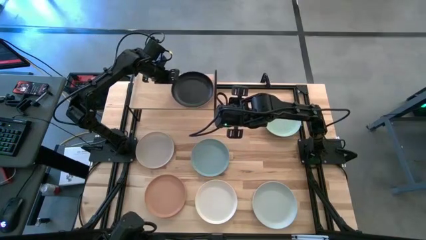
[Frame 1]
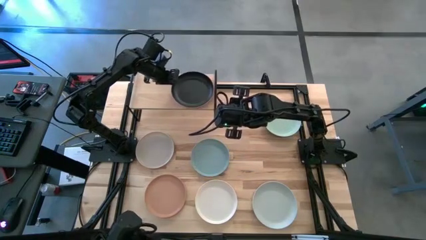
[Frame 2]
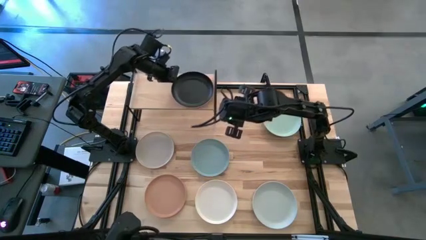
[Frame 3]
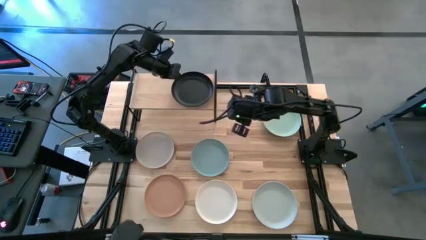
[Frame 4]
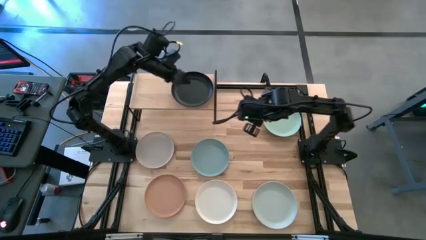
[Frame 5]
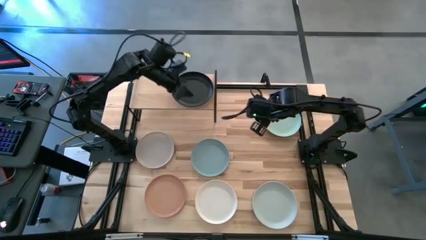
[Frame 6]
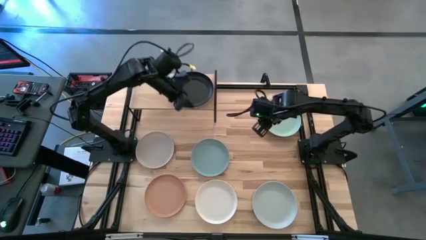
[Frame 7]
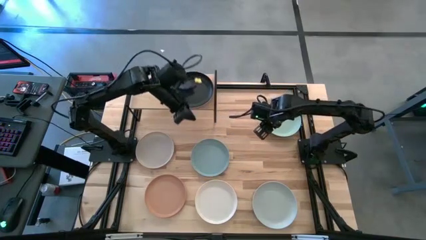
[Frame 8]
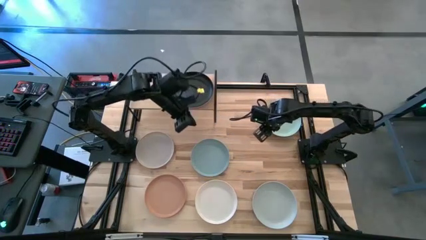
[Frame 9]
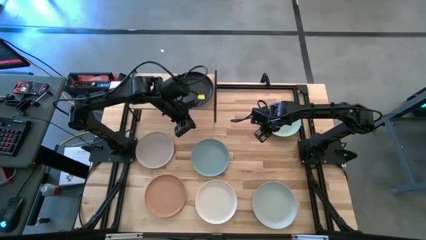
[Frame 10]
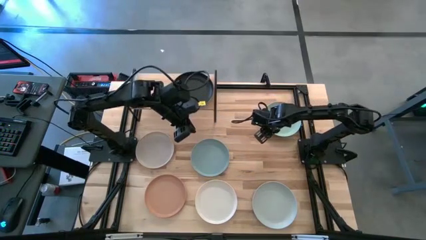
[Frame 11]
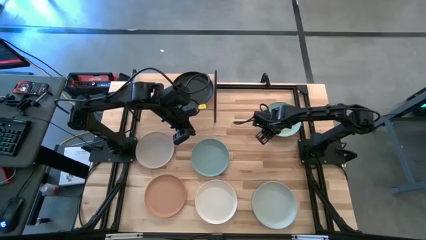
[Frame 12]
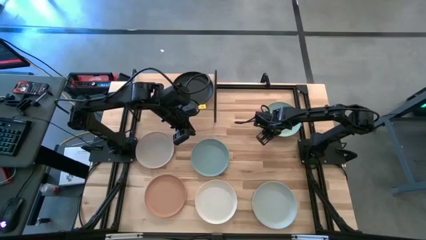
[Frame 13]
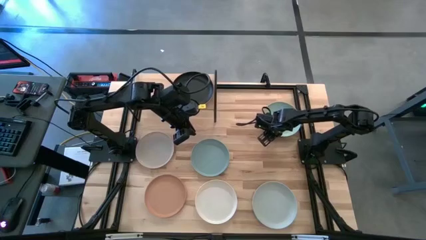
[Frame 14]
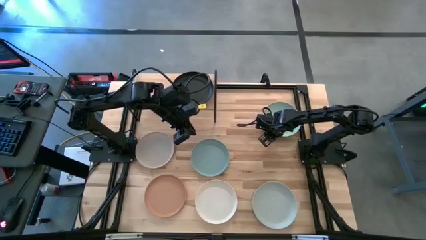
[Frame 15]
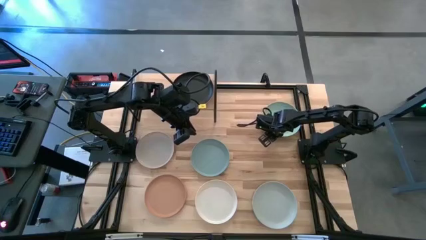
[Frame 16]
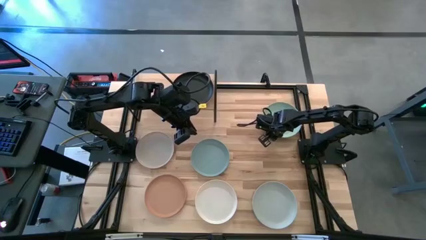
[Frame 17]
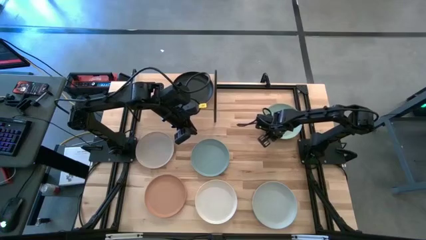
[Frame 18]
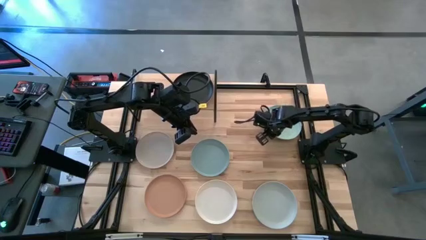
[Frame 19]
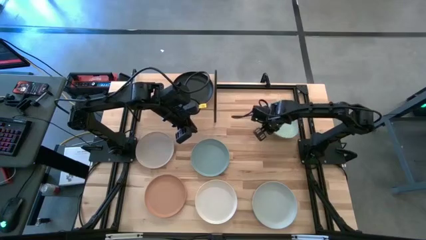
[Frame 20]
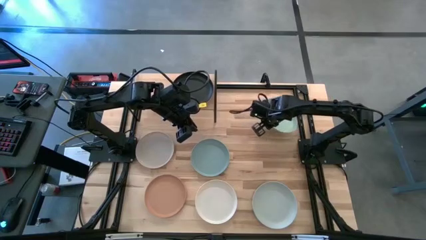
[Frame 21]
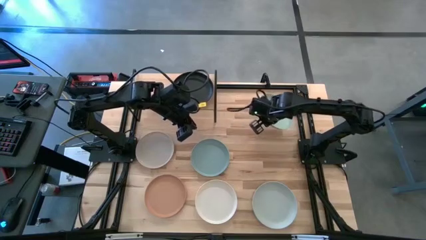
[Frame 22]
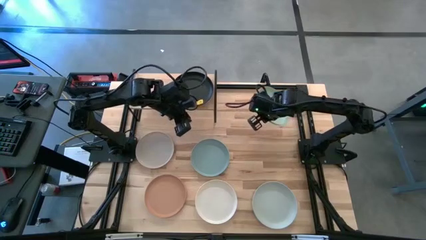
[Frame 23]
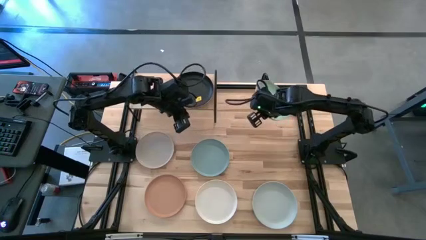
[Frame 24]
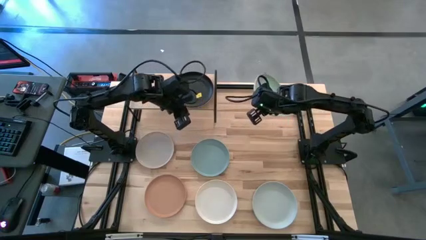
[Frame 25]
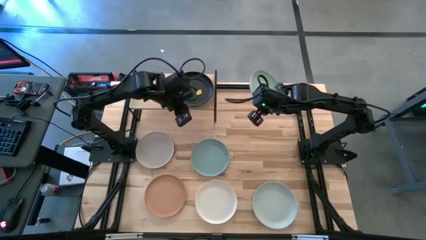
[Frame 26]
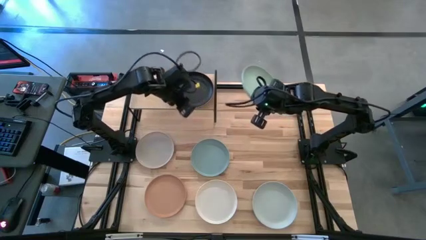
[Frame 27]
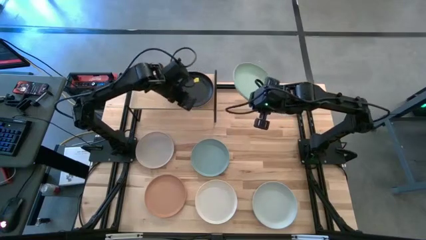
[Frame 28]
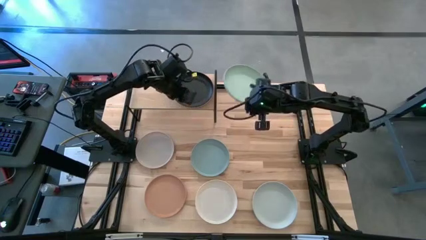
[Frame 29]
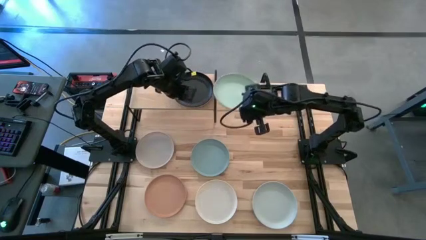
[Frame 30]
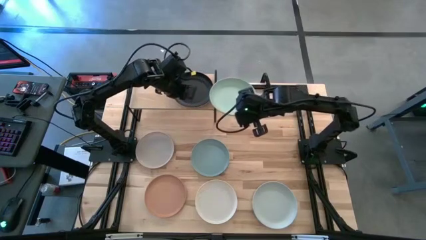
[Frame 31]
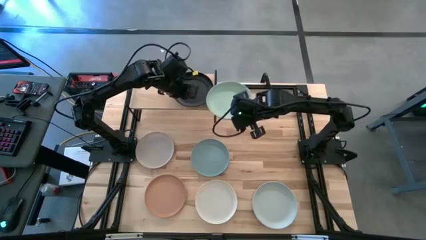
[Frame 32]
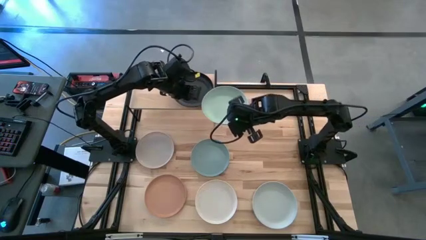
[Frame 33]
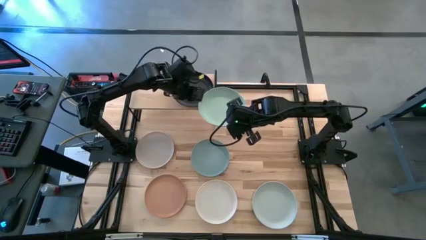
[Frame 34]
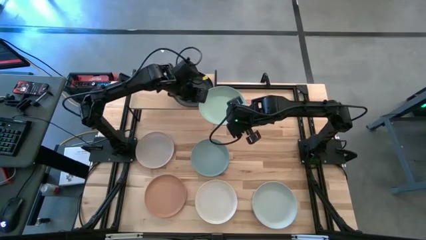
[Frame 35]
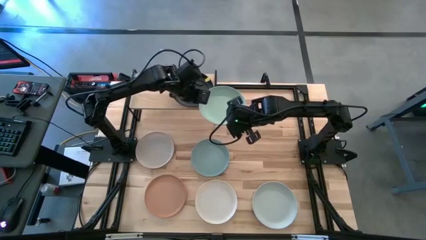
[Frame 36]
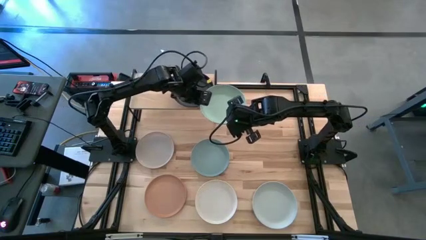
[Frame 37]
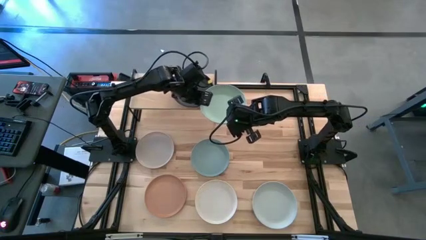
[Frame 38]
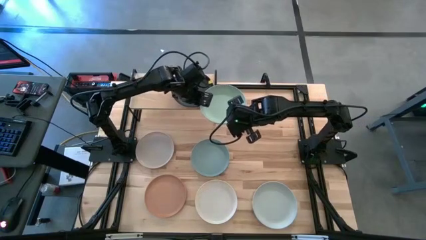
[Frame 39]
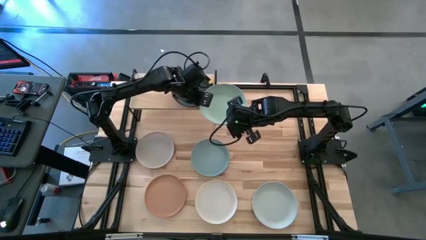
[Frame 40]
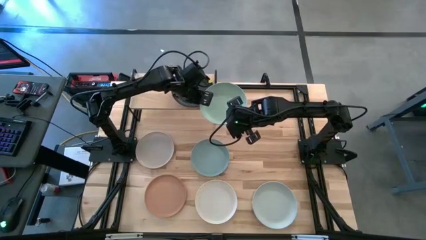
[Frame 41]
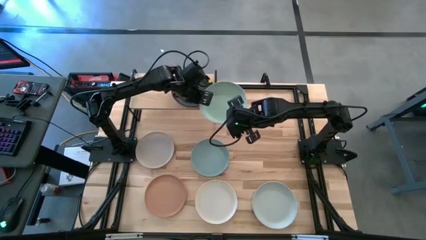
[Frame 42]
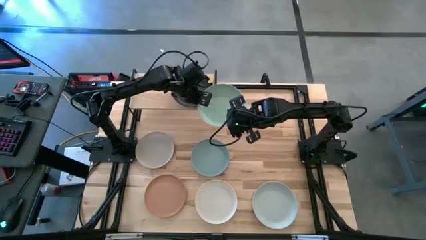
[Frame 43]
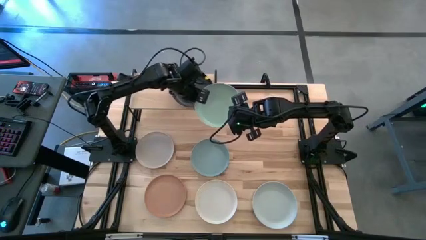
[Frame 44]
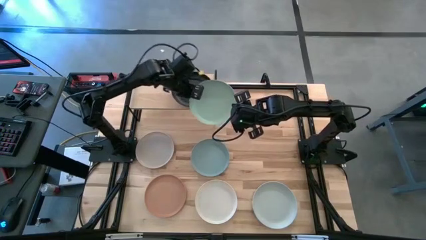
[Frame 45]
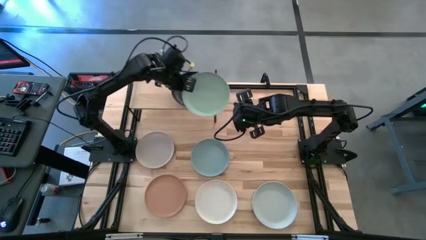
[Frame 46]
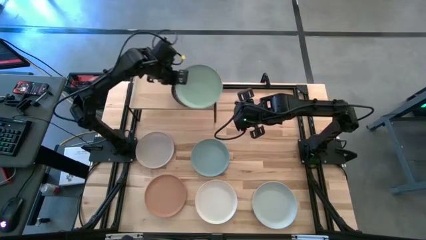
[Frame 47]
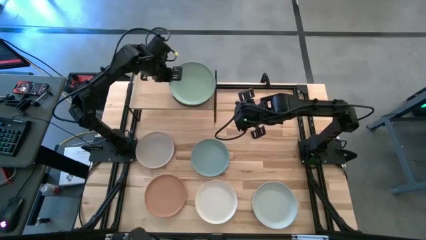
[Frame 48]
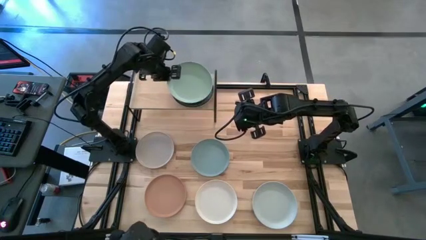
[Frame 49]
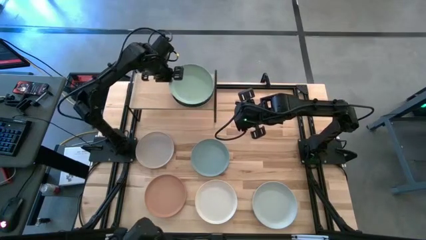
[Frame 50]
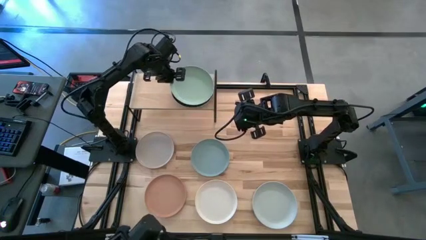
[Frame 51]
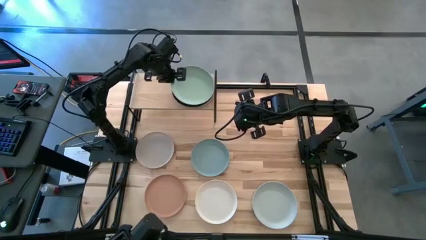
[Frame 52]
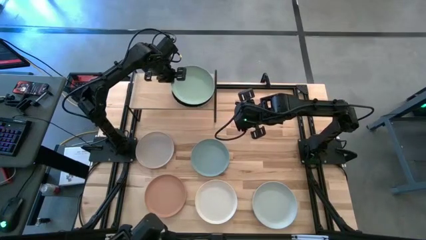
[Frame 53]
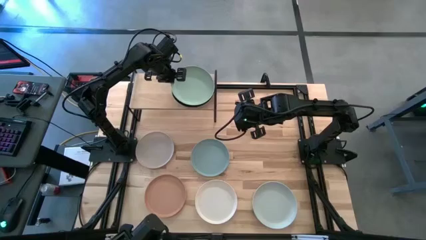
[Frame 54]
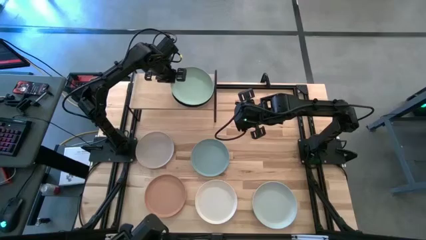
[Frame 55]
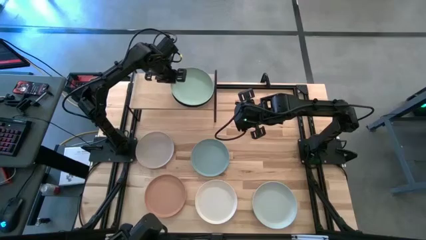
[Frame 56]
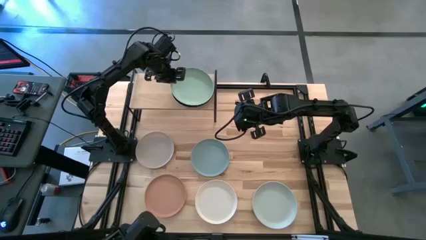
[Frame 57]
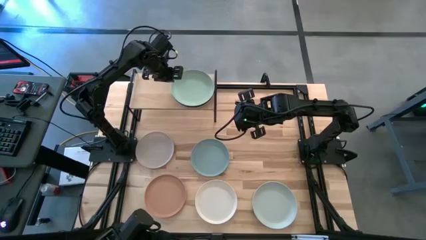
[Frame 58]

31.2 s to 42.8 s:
Task: Place and stack plates onto a shelf
Stack the light green plate into the black plate on the shelf
